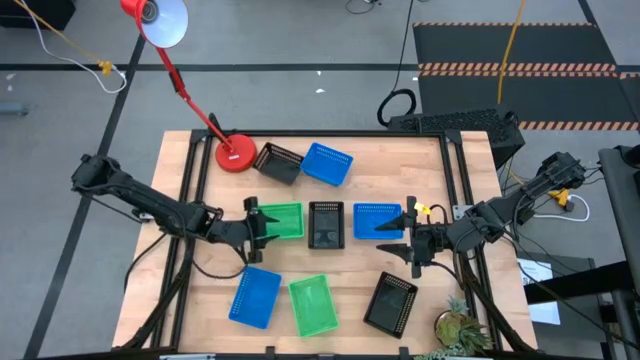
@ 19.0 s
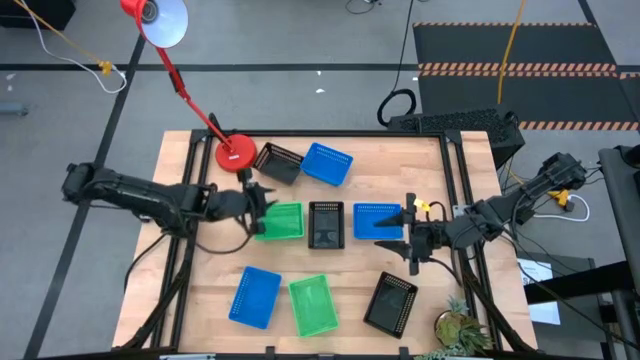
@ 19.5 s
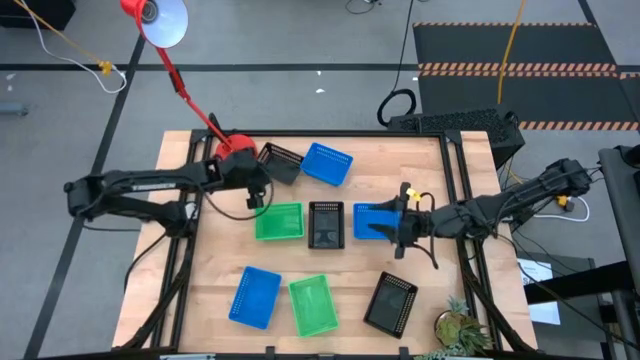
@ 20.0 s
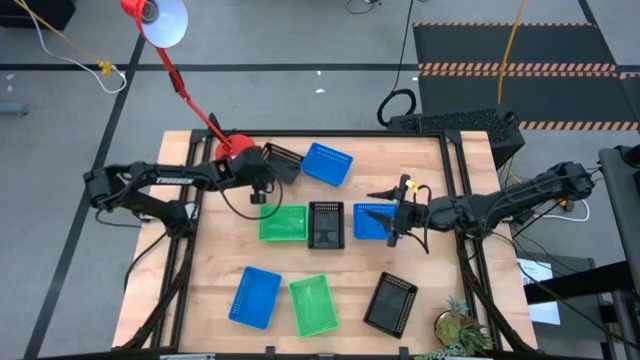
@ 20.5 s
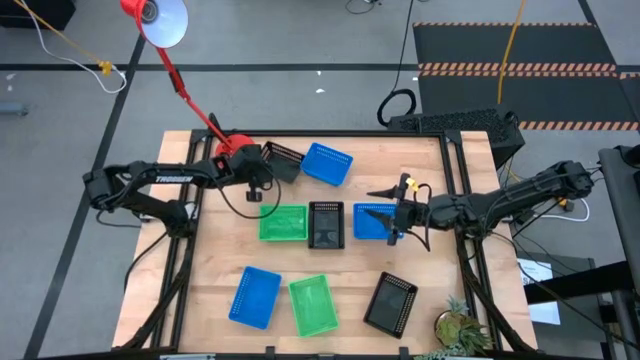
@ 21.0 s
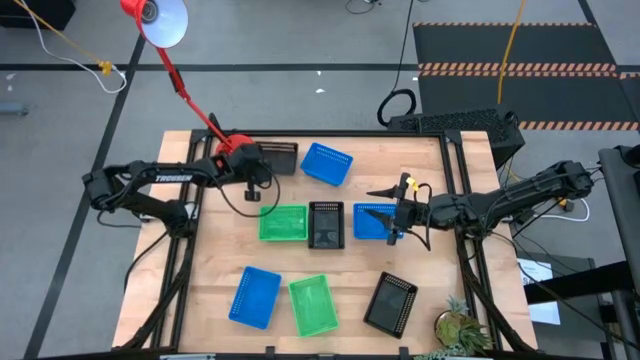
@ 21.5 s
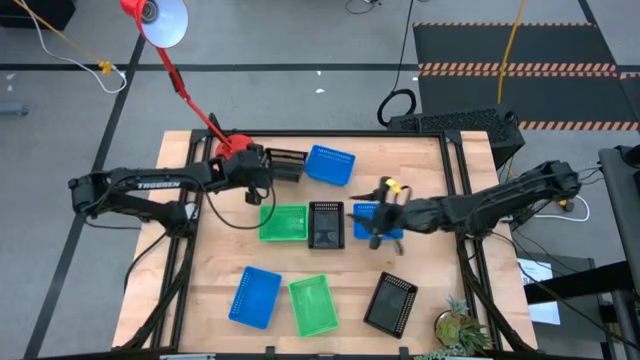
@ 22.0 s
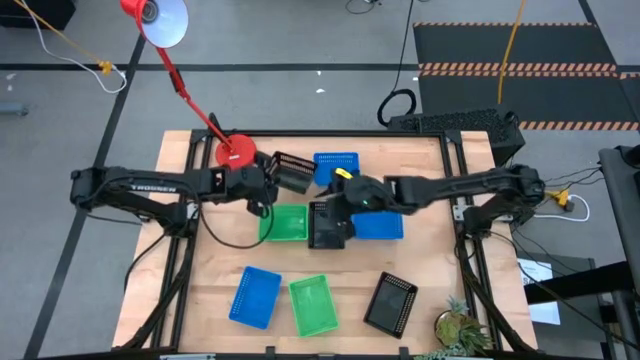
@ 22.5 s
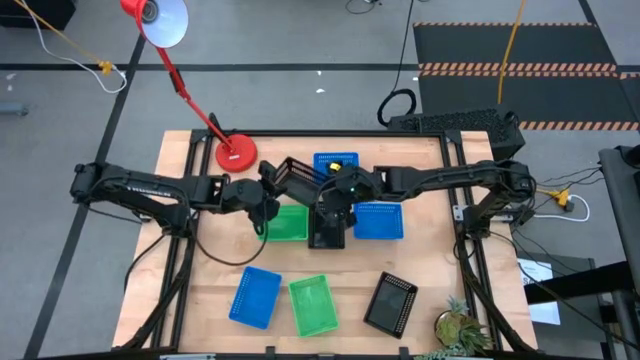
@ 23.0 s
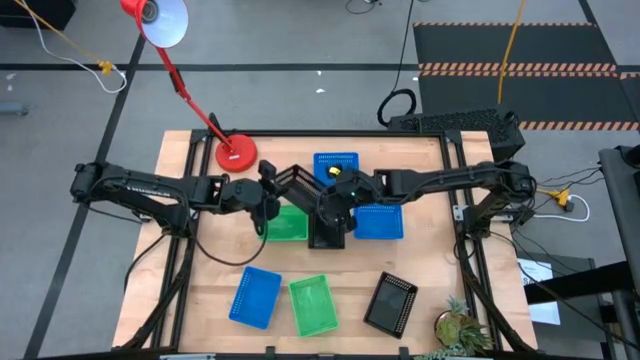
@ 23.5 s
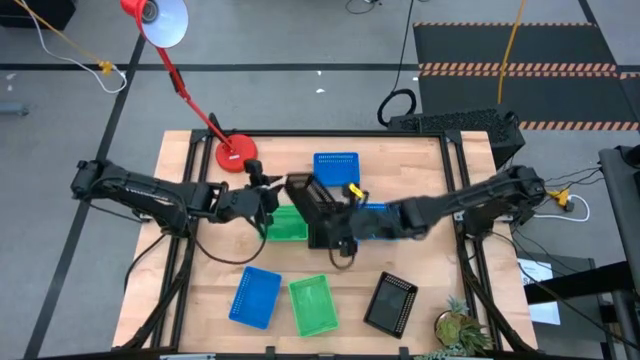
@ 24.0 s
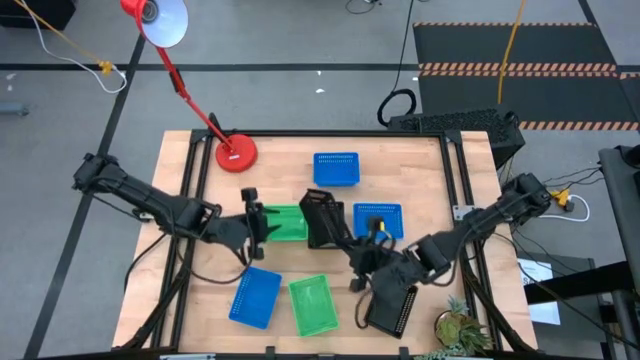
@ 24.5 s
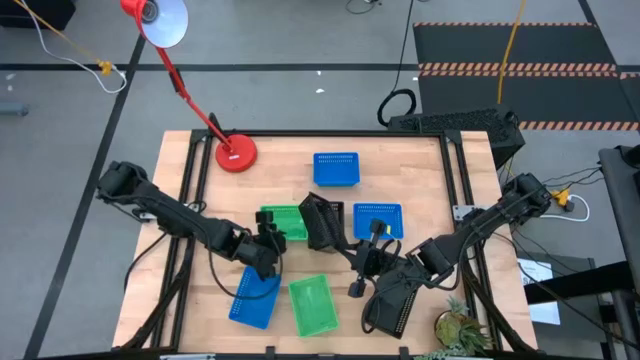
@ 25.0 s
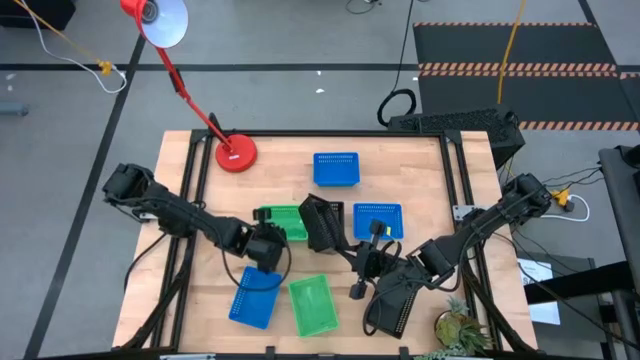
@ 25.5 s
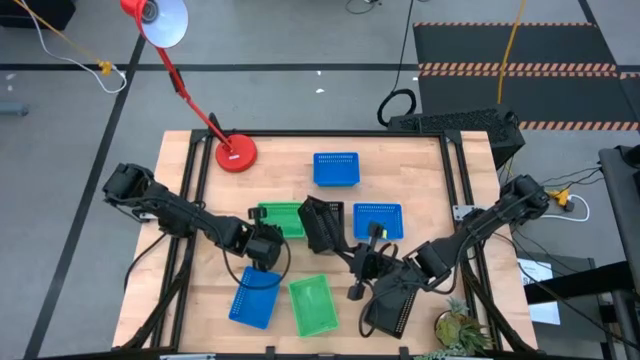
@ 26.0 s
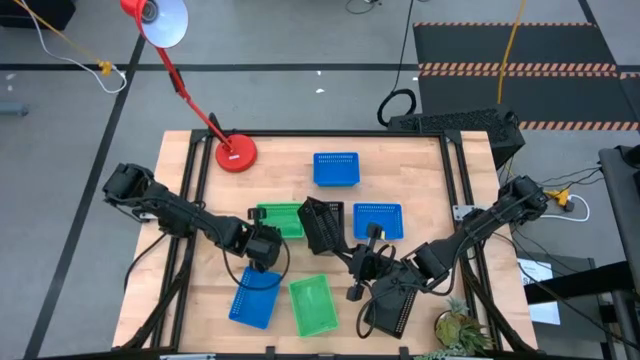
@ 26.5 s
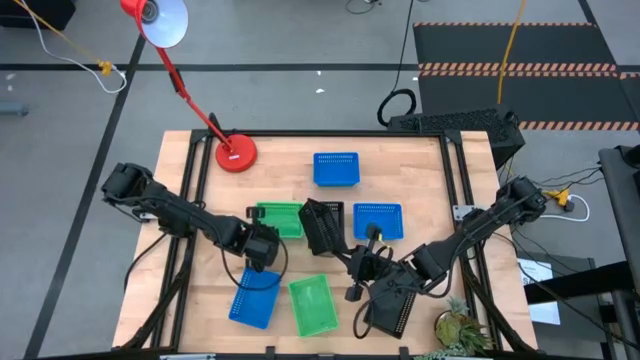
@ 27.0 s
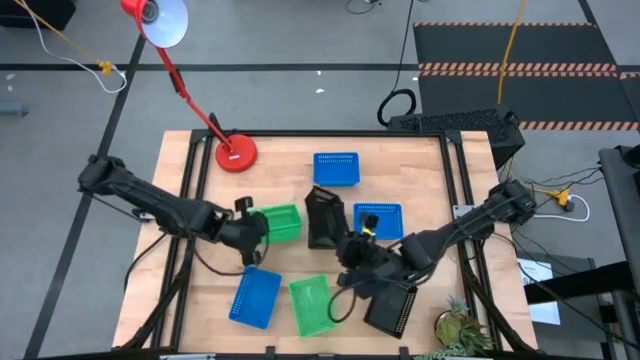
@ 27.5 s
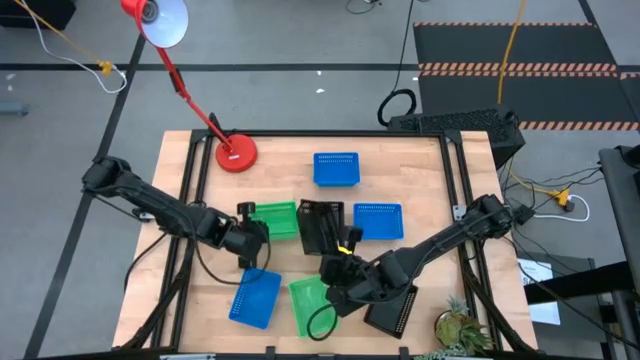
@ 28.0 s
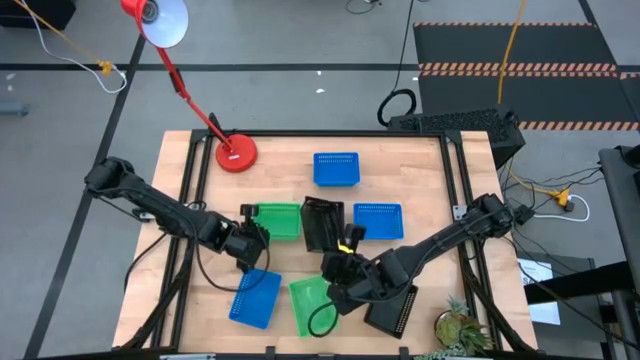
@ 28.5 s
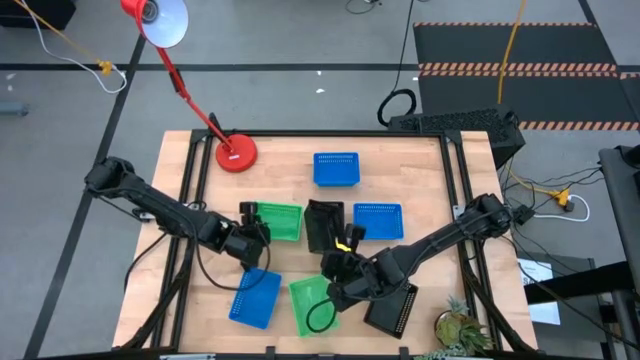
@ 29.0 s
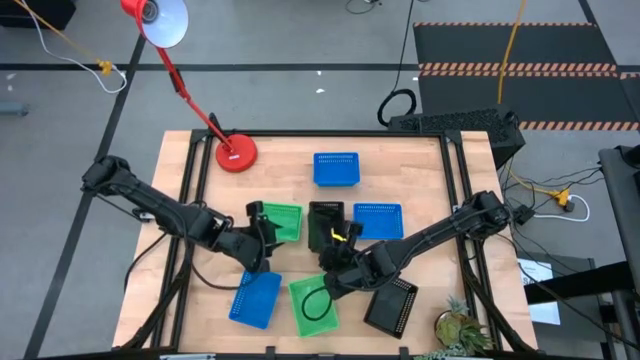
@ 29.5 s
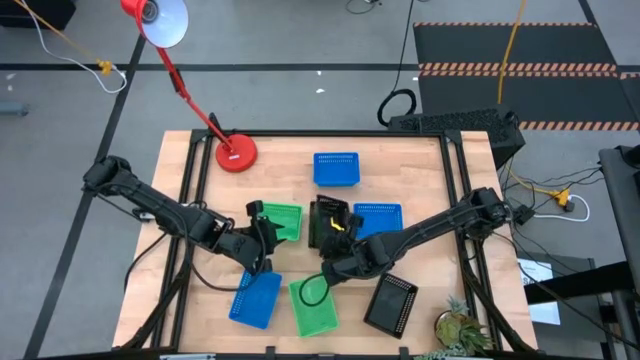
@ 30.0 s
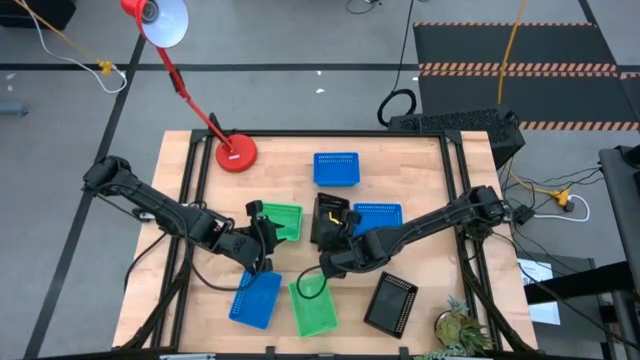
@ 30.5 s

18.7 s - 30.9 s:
Stack the top black bin on the middle black bin

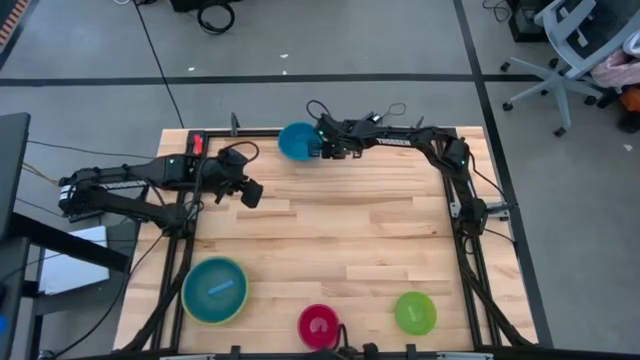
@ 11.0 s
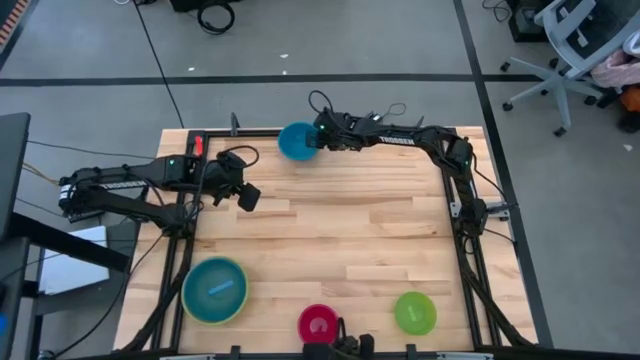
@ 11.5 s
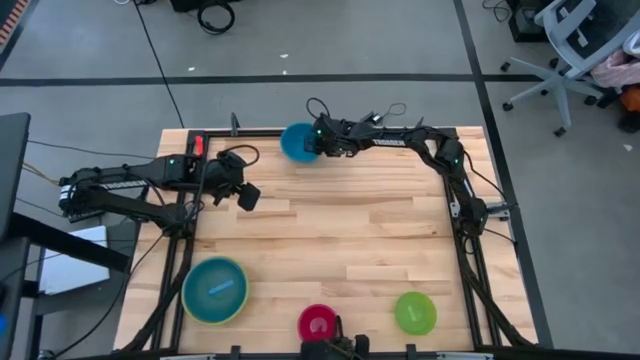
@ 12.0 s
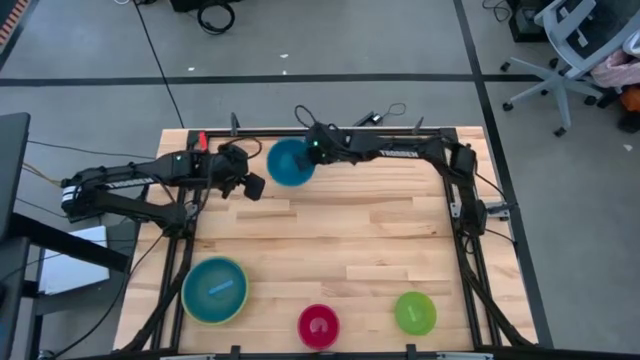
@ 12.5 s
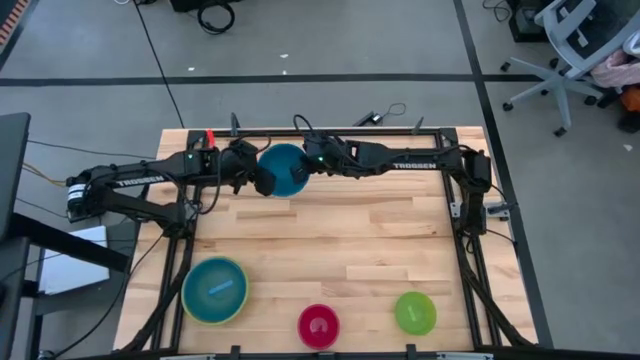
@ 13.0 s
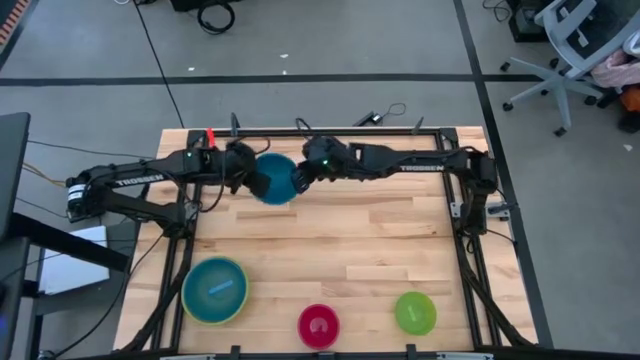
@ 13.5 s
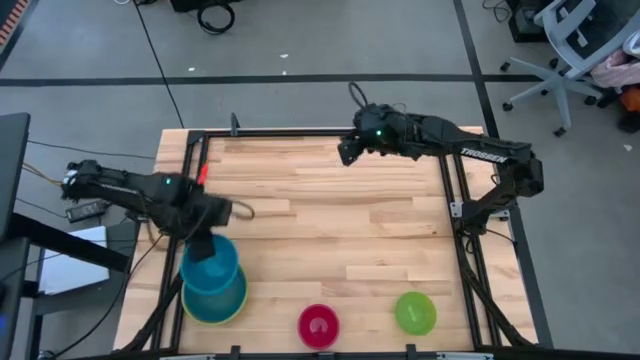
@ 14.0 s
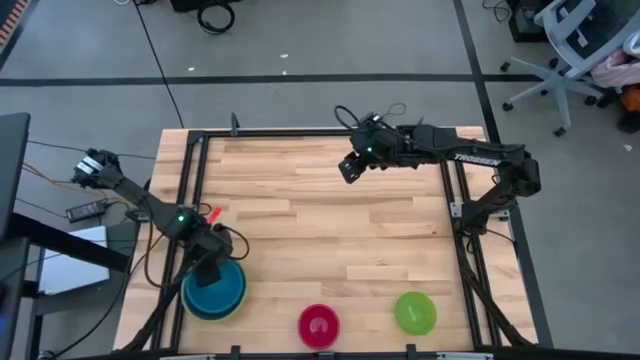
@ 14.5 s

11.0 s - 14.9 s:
Stack the small blue bowl on top of the big blue bowl

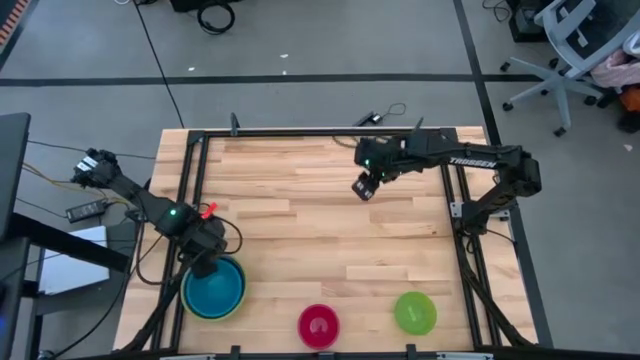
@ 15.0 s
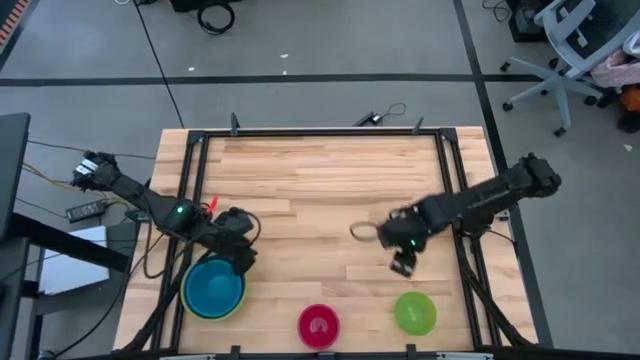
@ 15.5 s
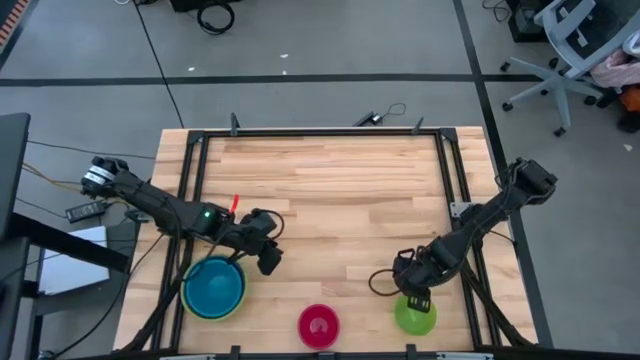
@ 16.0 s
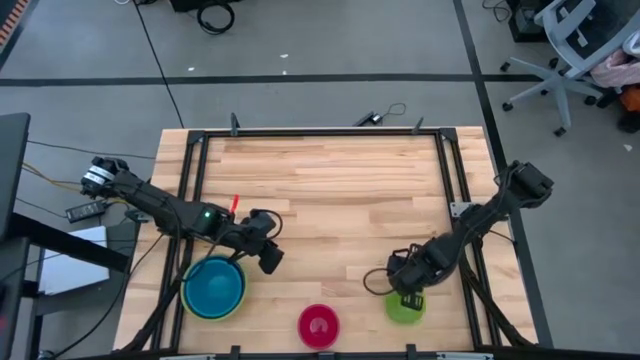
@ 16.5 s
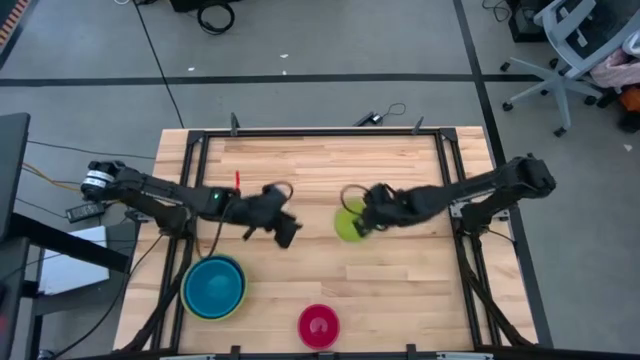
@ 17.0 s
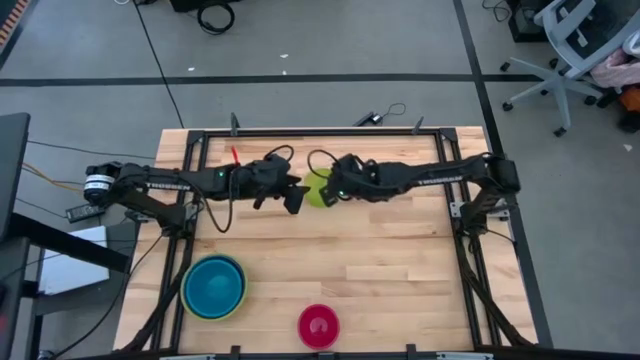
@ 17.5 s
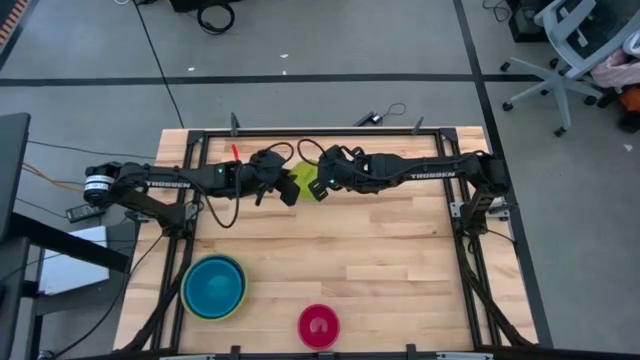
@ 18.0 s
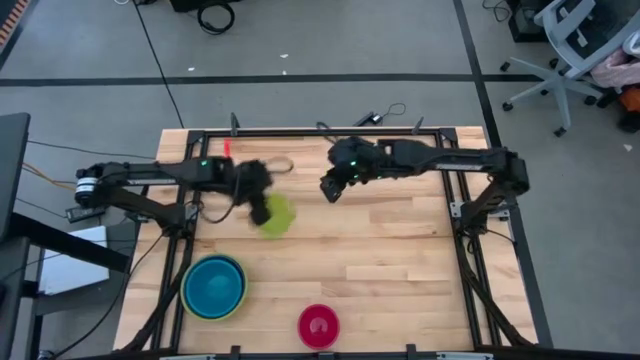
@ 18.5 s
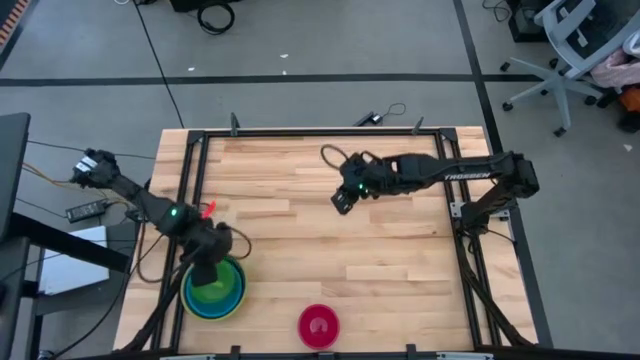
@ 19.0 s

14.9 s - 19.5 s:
Stack the light green bowl on top of the blue bowl
